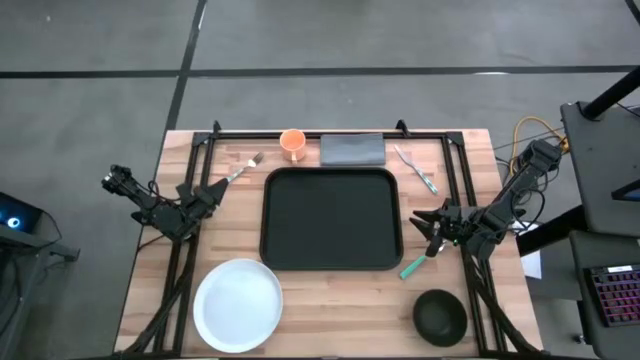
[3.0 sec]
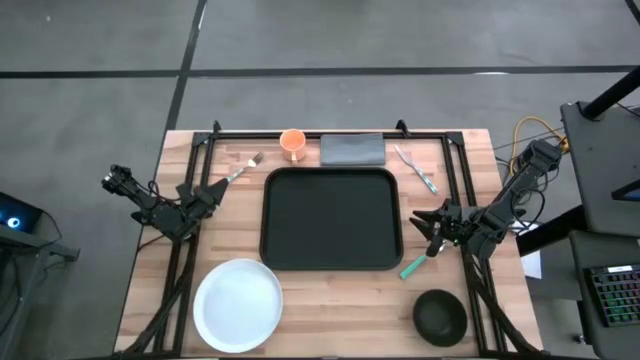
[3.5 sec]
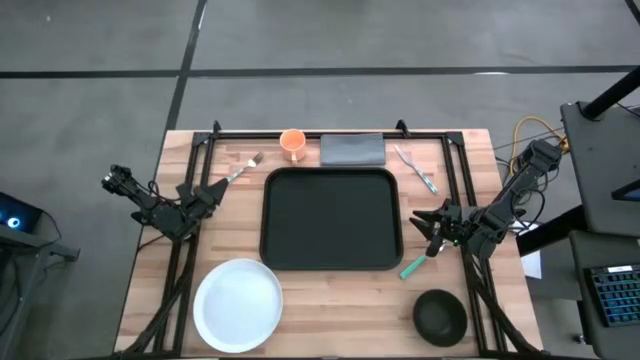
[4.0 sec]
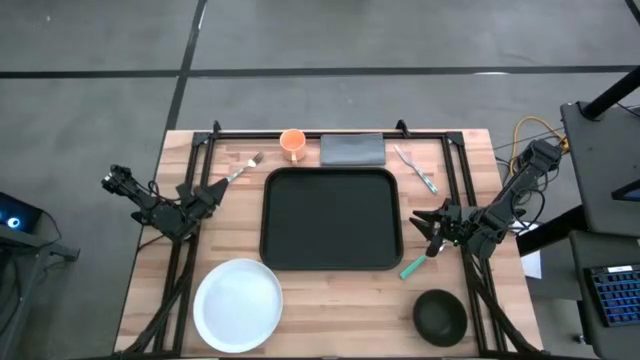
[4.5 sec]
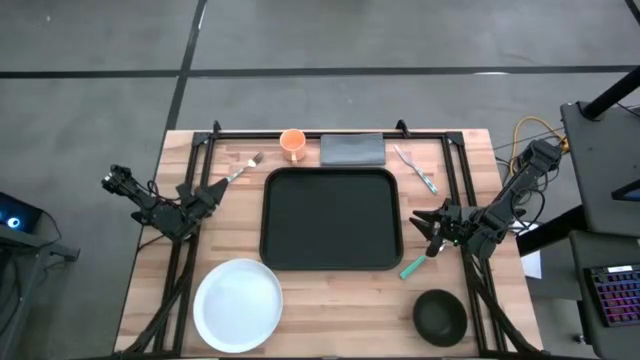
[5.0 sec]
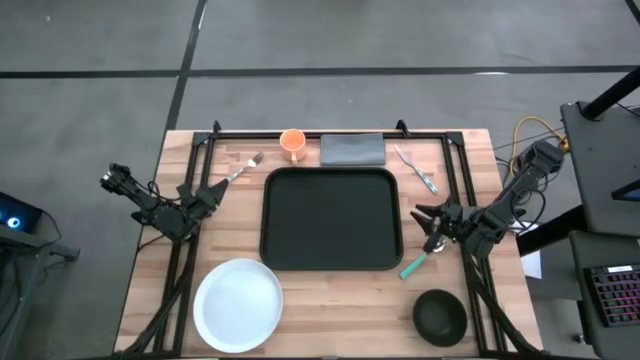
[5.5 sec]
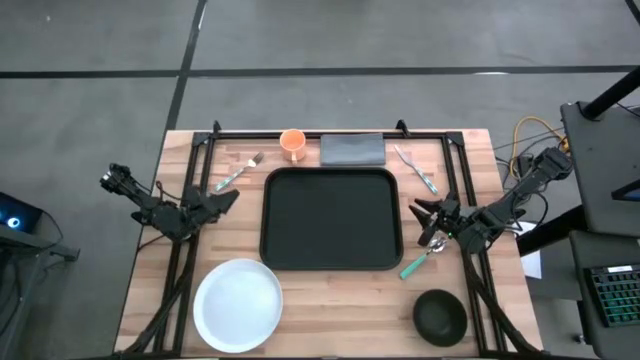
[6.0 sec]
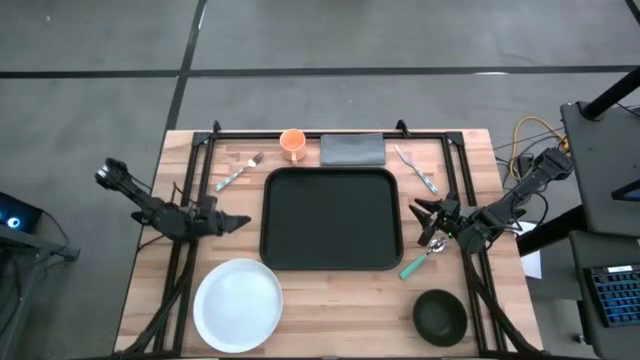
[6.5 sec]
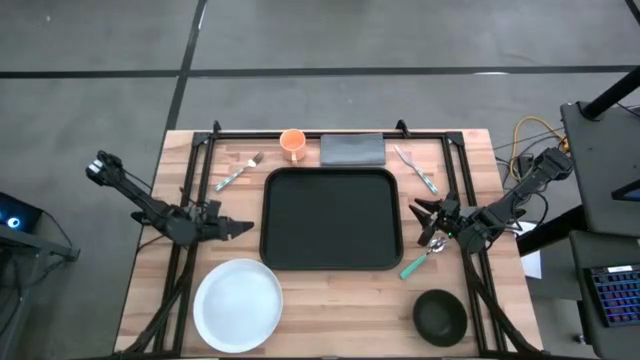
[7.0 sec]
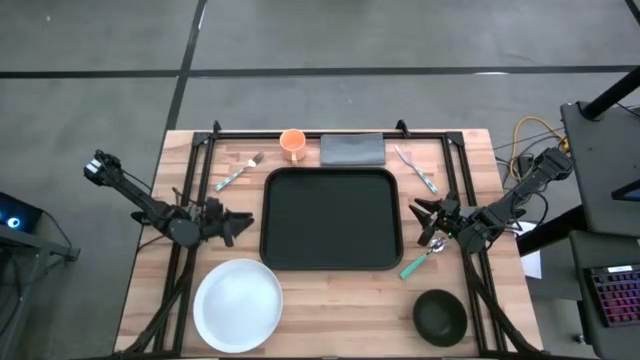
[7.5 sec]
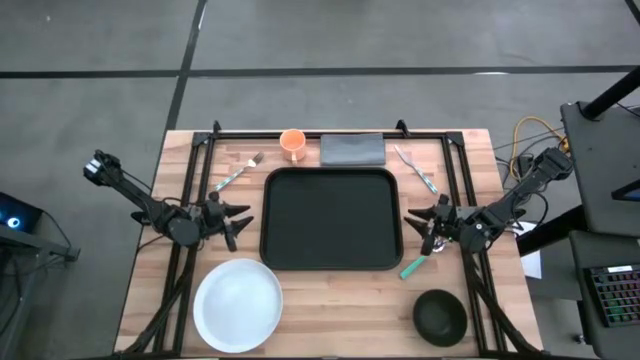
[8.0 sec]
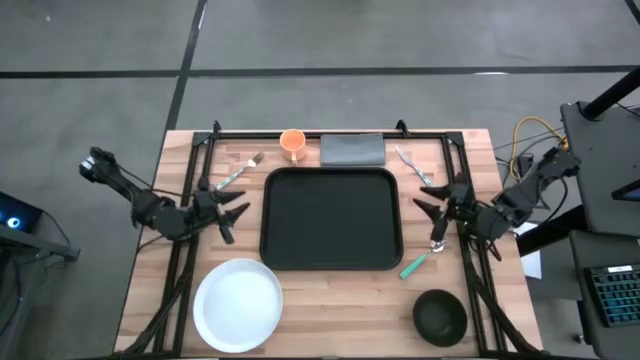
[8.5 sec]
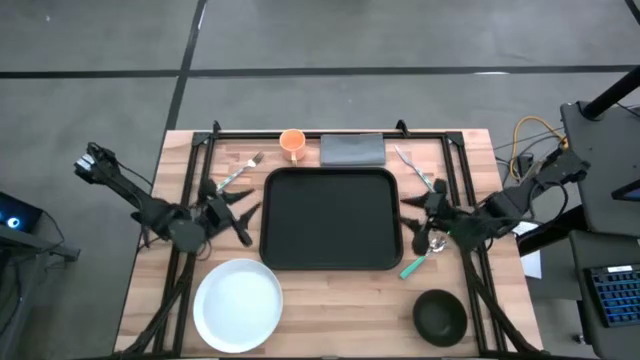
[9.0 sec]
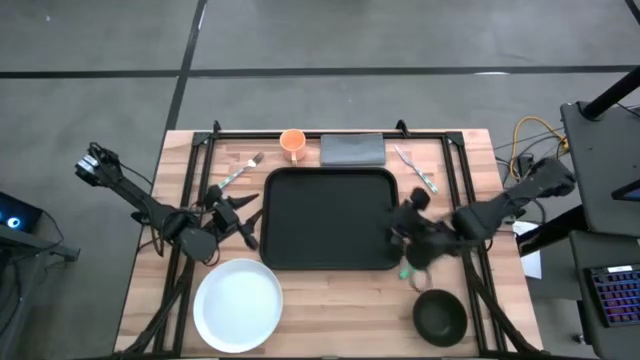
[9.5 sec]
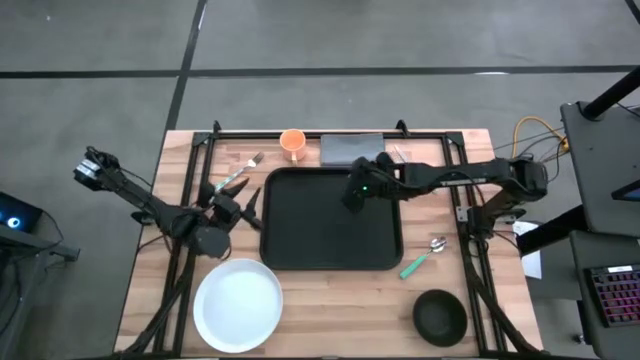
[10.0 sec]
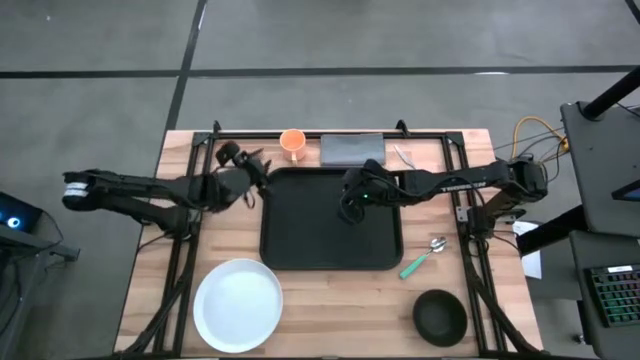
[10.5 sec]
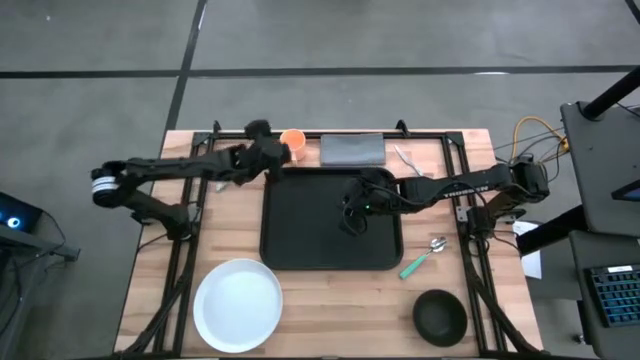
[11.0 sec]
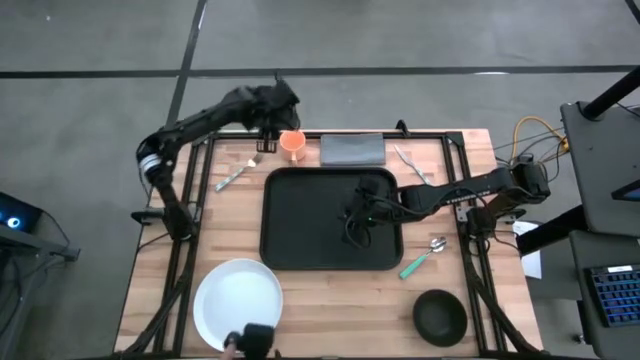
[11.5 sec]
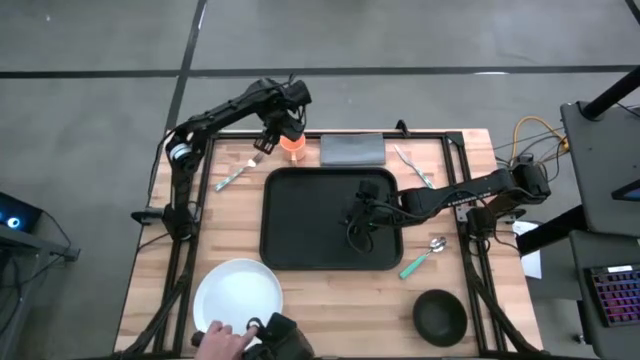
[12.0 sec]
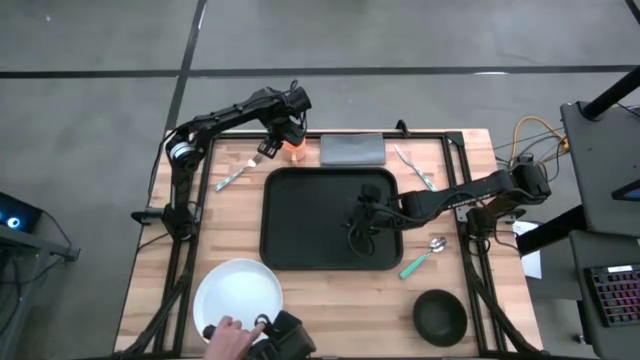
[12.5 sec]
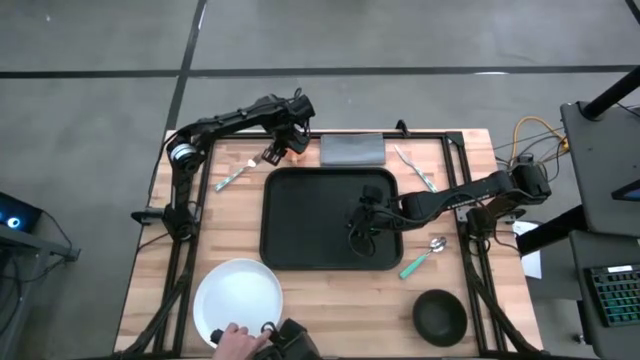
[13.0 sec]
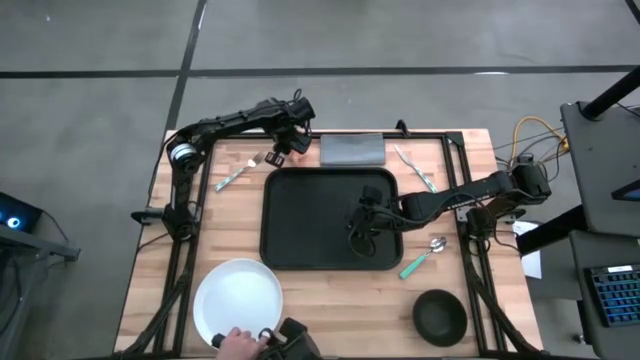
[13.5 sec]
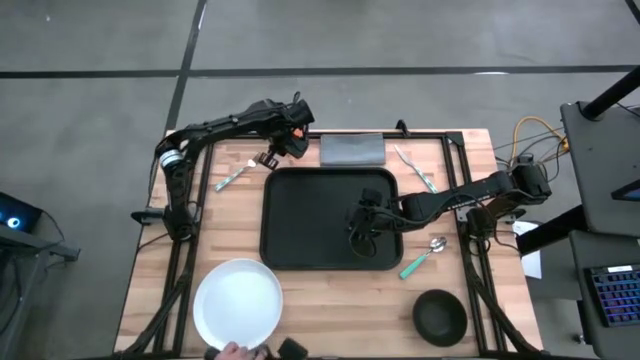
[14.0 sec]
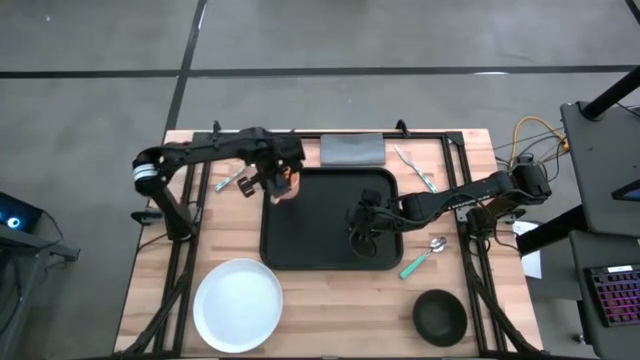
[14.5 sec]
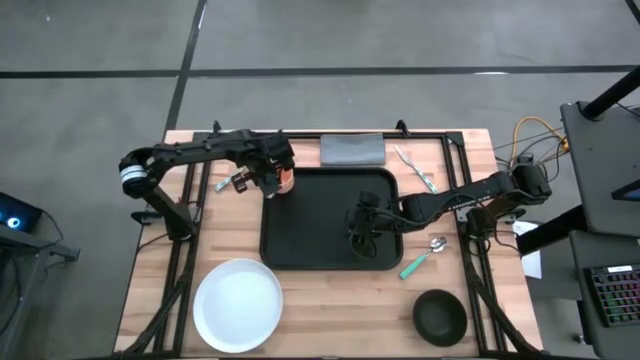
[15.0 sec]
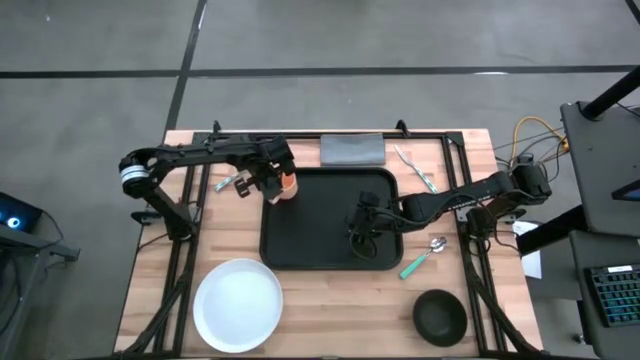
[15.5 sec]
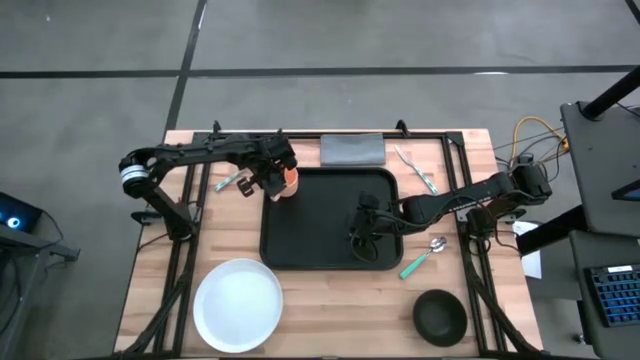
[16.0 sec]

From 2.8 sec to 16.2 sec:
Task: Set up tray
Put the orange mug on the black serving tray
